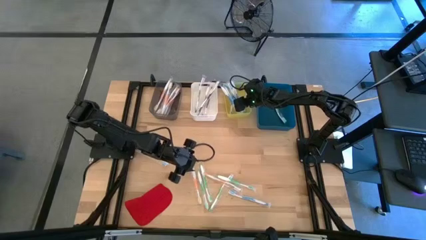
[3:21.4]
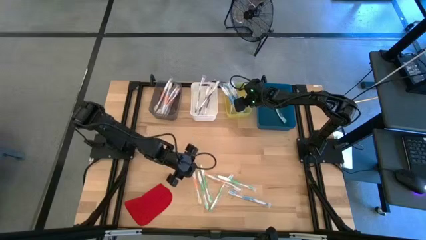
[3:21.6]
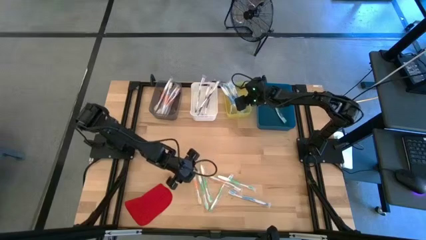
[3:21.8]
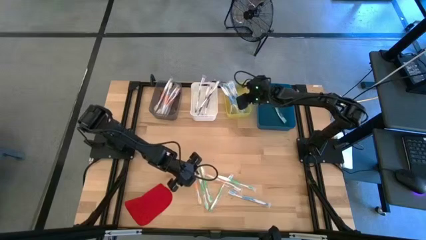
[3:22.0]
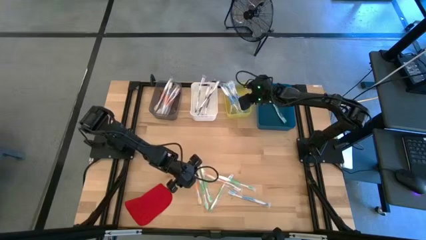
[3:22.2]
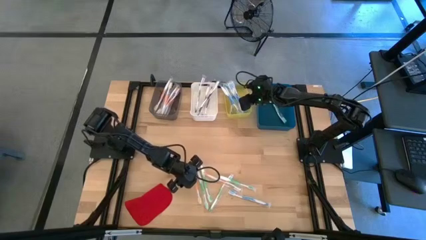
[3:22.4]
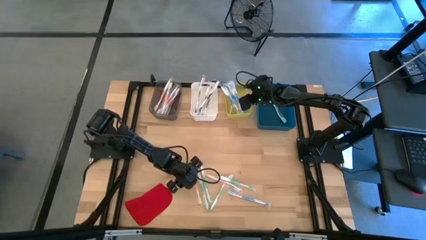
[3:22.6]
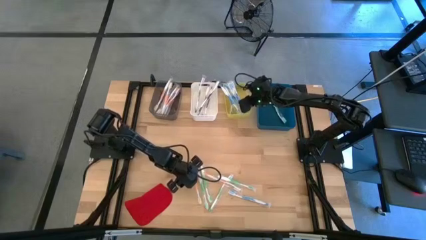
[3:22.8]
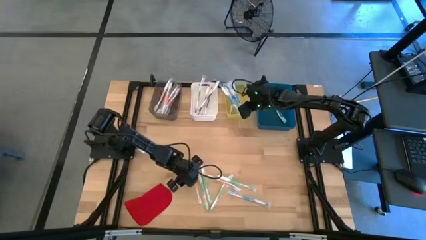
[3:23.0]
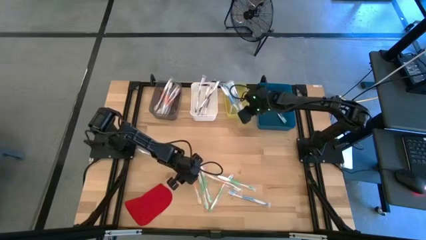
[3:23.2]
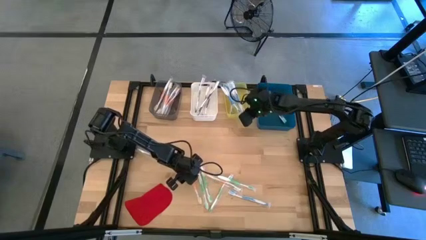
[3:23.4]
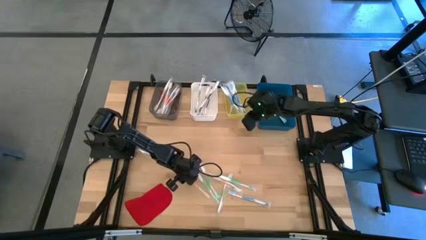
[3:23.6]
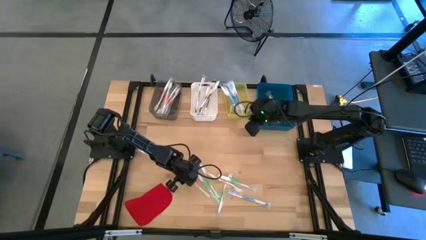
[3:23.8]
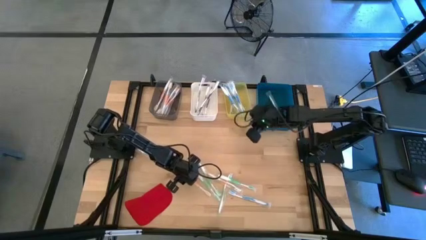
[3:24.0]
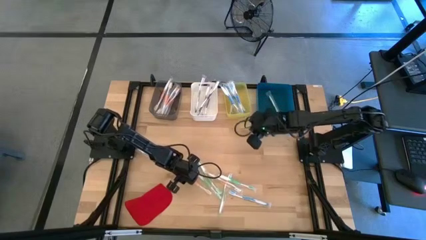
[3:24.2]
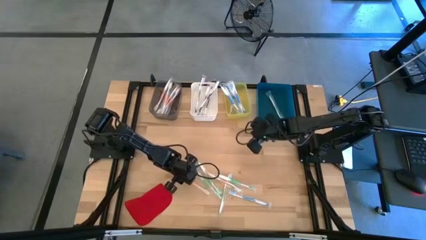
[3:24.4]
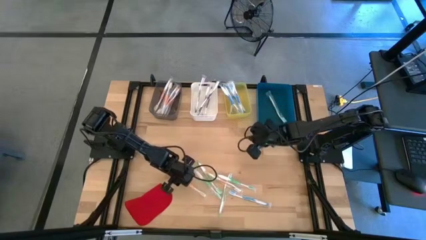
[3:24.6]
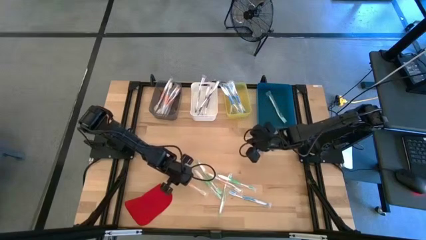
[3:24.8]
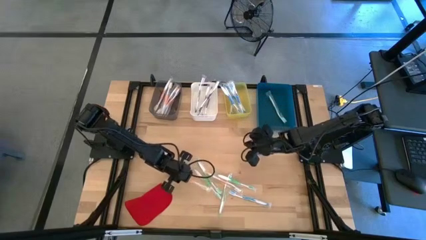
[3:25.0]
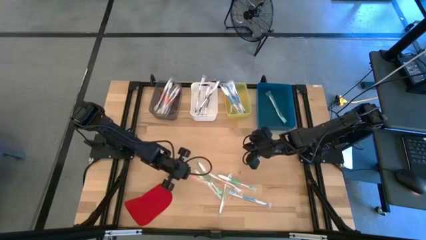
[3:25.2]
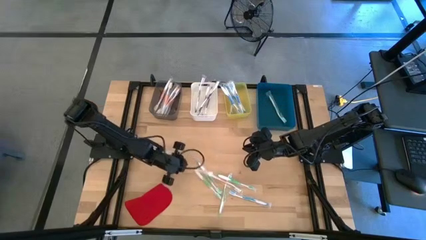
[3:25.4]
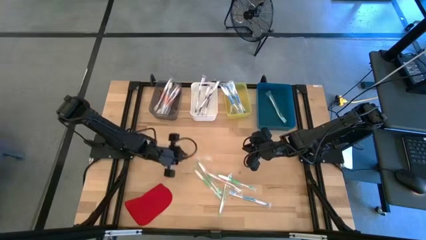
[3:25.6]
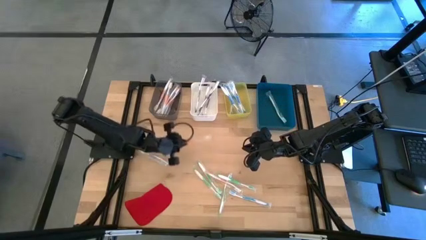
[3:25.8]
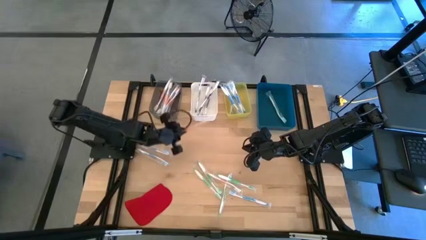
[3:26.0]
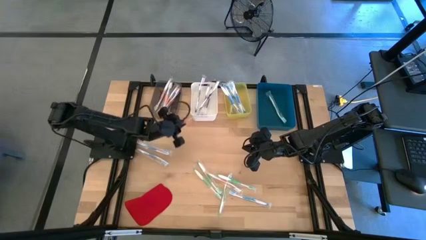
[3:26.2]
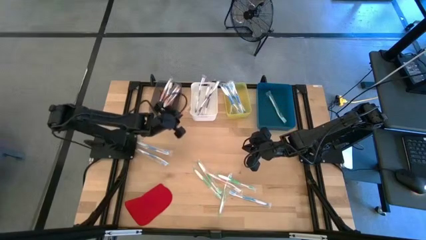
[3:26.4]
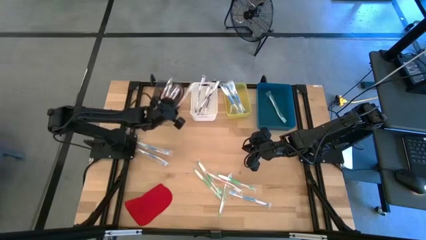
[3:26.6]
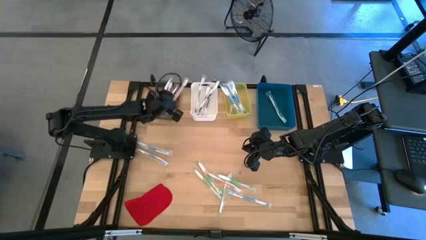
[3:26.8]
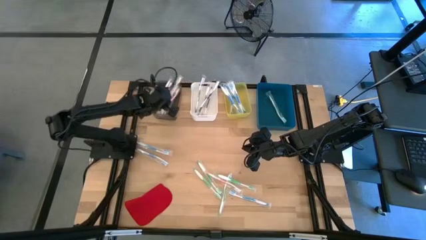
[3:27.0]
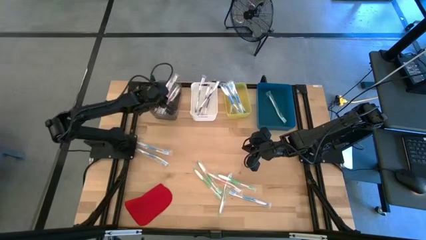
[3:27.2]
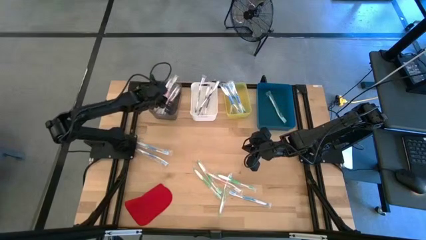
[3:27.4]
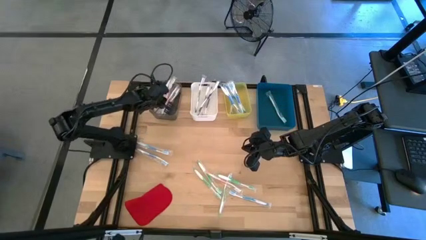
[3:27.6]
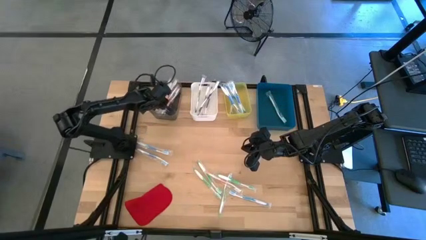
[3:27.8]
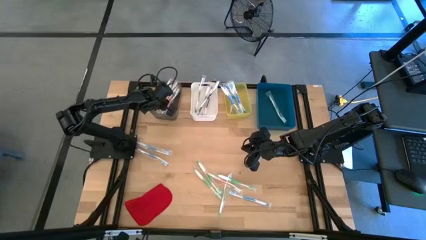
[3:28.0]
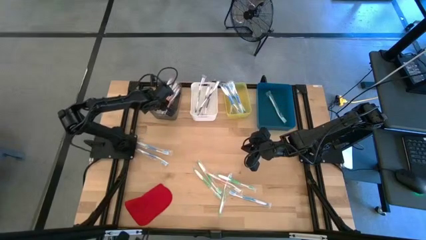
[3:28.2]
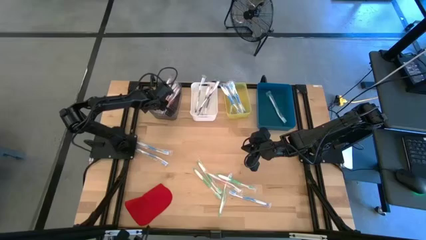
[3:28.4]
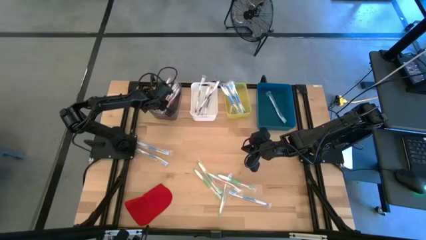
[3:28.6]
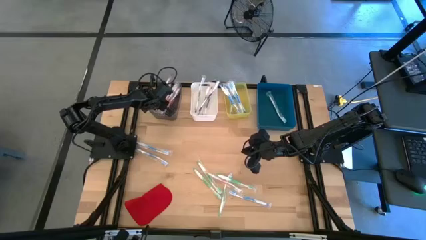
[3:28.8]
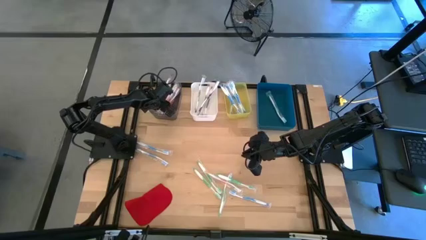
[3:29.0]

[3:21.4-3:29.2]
Task: Pick & Place Toothbrushes
Put the orange toothbrush into the black bin

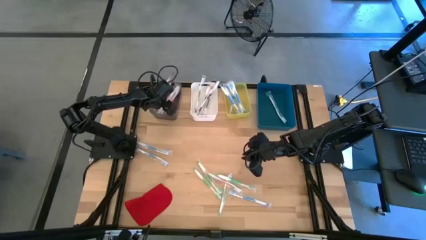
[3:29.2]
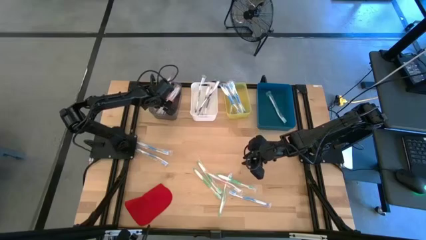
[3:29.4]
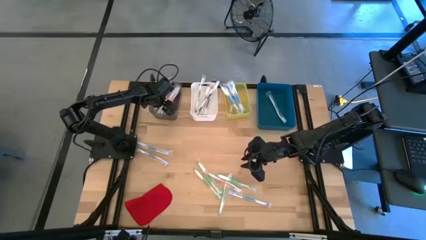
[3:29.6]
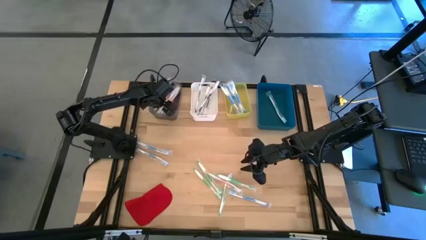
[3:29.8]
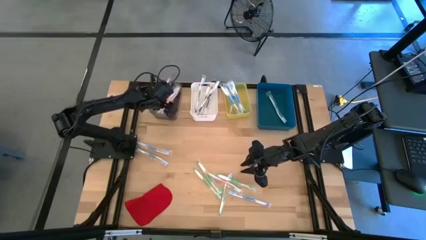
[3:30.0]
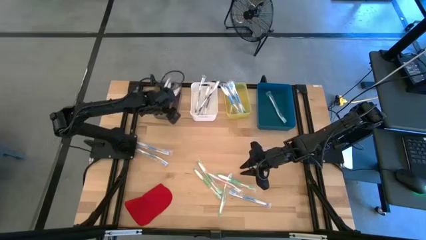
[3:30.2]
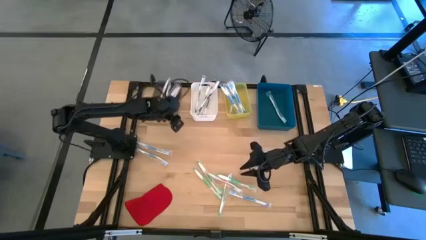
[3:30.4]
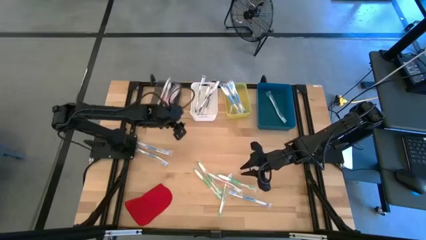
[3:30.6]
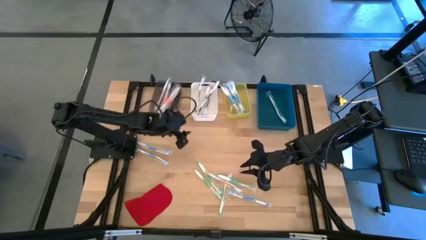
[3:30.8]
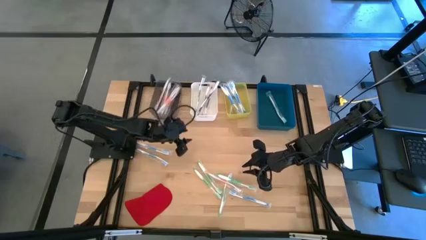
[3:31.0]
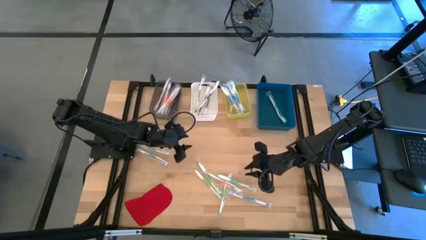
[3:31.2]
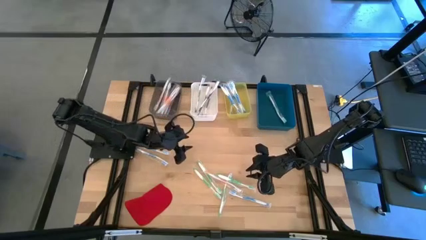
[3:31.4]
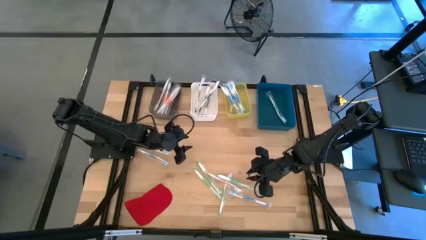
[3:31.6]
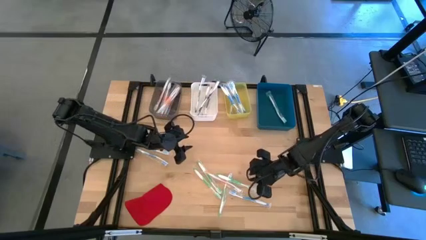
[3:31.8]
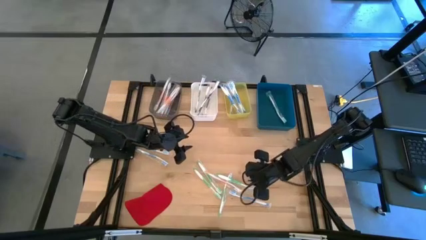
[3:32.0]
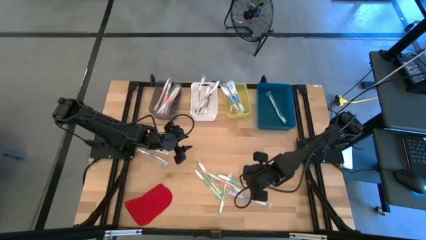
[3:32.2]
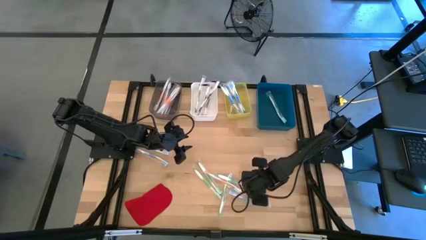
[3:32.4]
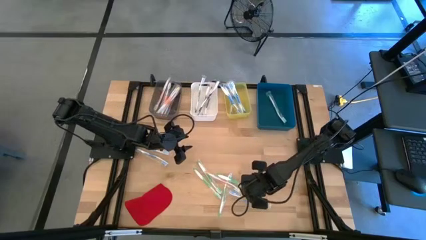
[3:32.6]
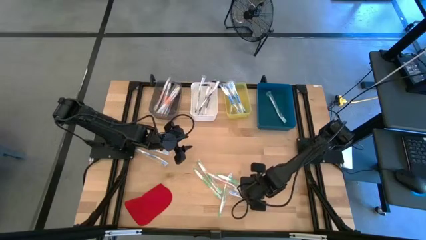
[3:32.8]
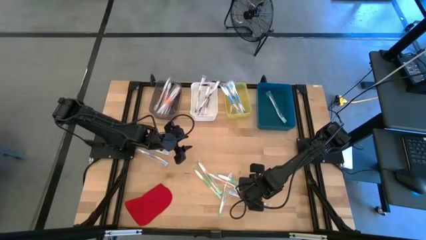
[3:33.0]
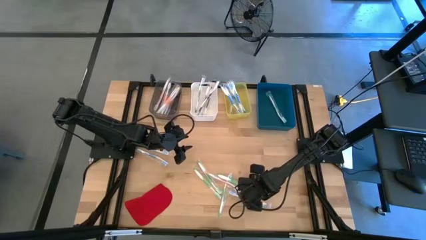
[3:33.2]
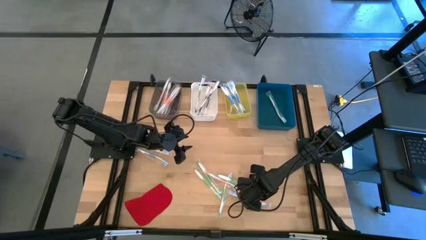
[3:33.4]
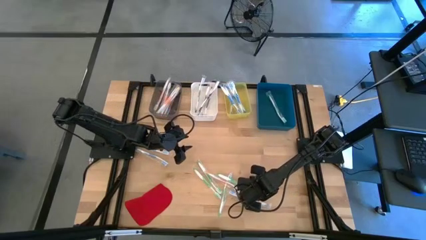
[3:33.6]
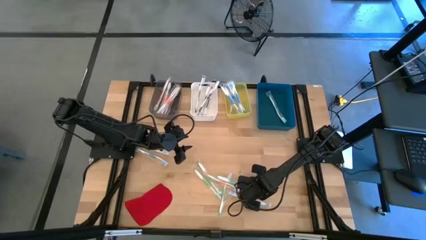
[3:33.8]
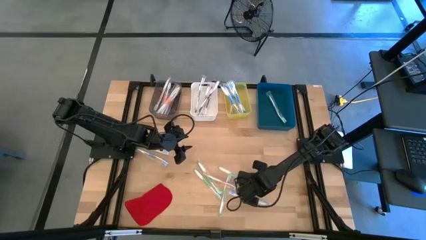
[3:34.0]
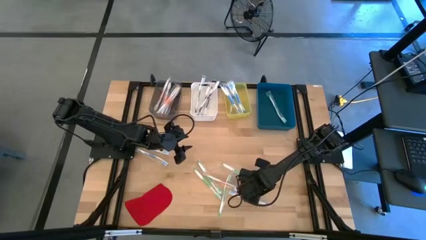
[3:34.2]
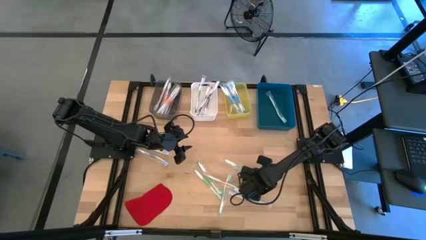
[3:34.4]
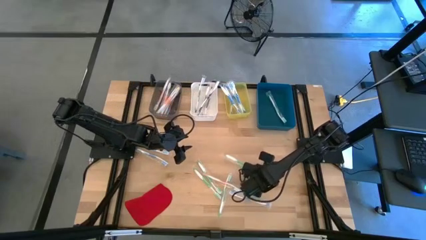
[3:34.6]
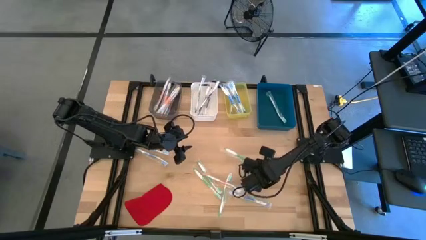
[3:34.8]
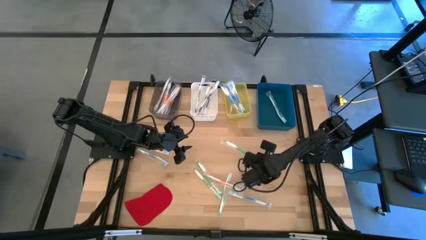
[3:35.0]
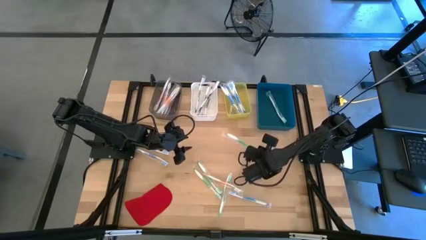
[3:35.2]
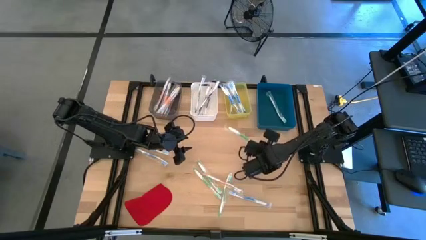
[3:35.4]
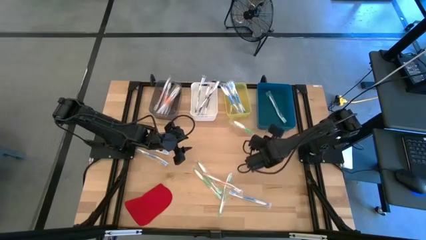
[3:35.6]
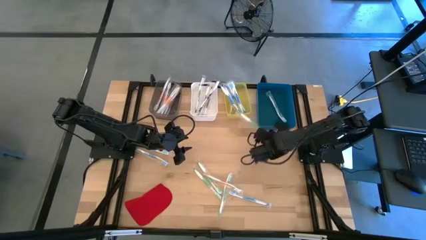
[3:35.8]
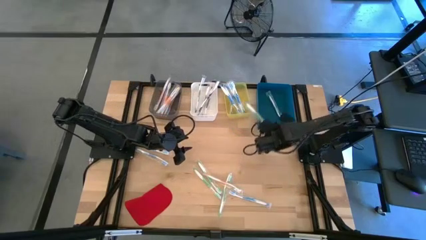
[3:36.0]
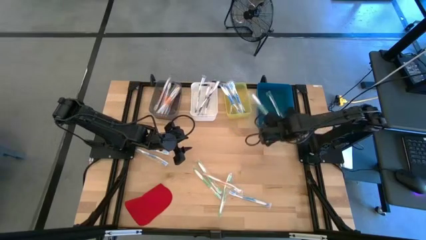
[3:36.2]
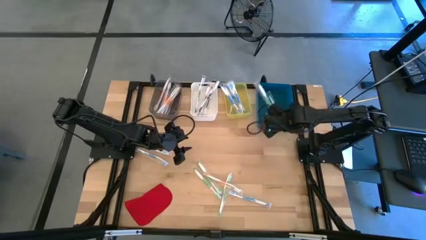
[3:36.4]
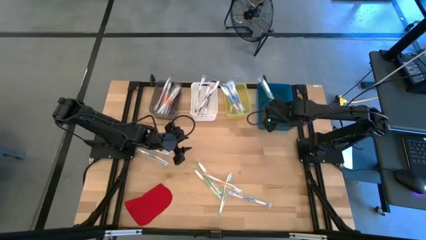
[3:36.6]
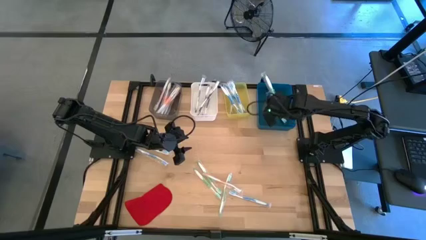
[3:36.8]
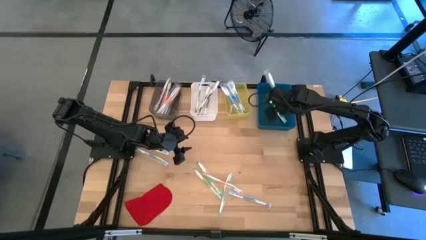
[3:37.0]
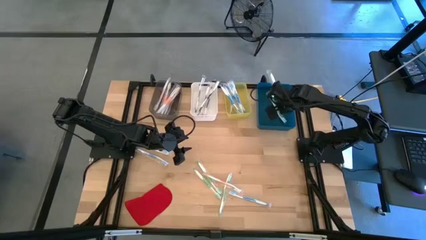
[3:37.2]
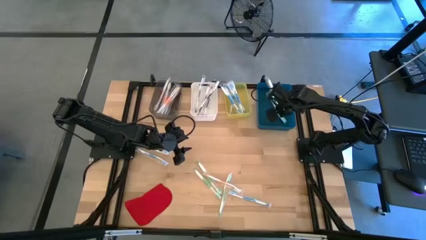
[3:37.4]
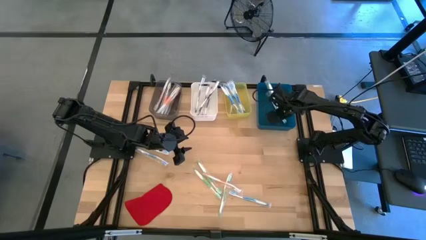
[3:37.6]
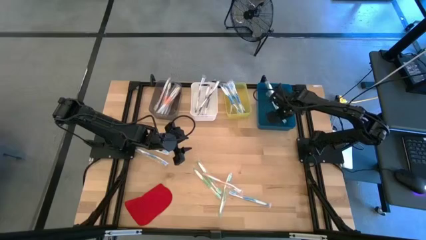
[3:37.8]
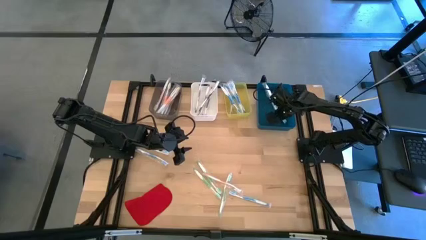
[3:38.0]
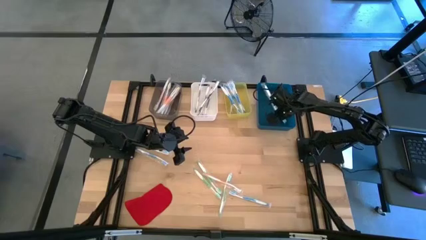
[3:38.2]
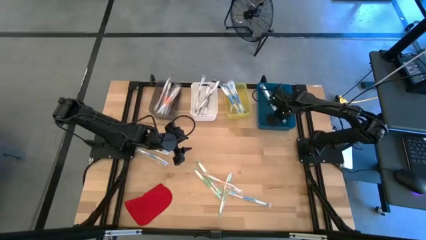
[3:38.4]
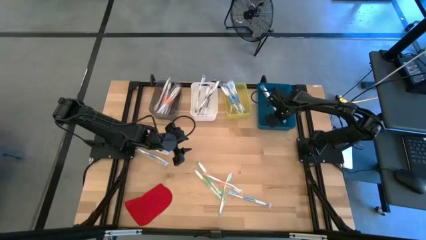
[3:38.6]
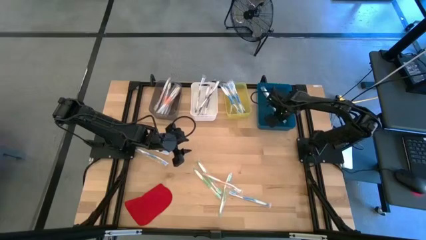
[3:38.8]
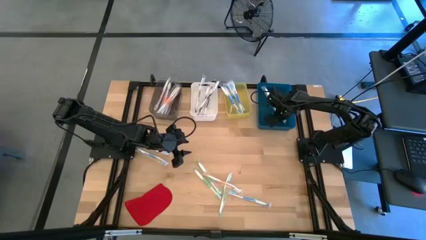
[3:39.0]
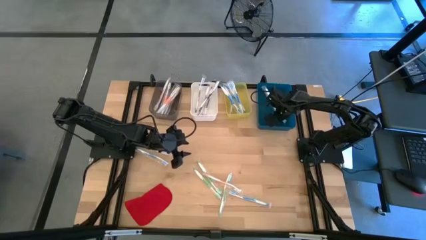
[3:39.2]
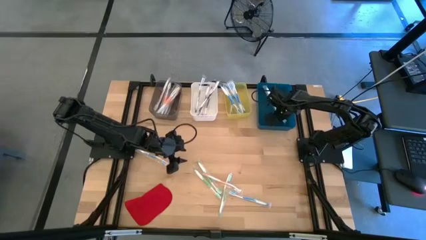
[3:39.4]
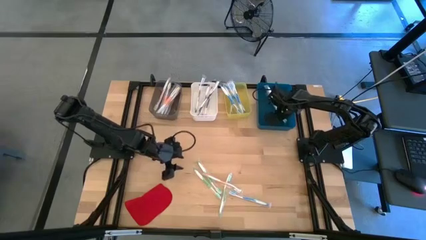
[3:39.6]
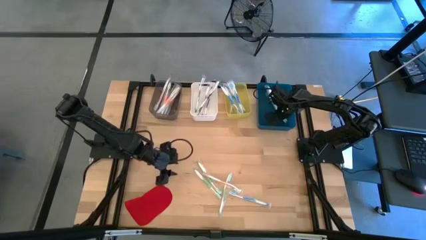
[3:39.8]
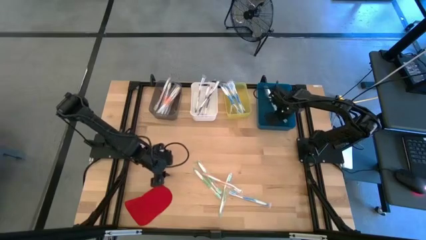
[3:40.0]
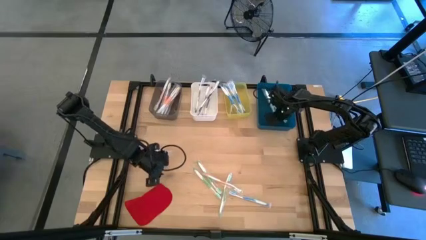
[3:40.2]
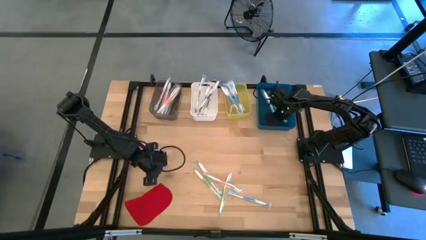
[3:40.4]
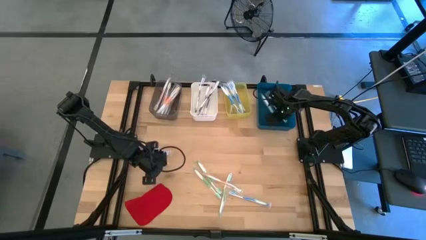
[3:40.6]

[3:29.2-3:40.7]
Put the green toothbrush into the blue bin
